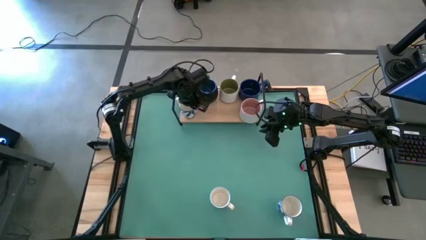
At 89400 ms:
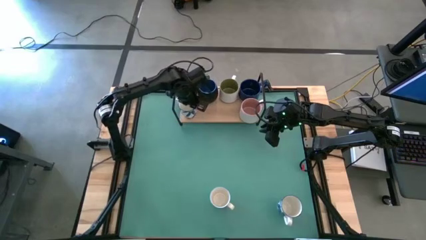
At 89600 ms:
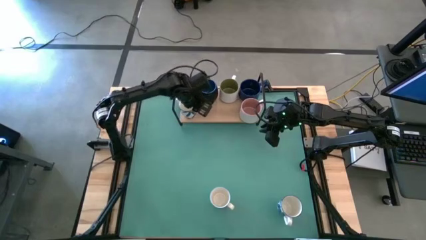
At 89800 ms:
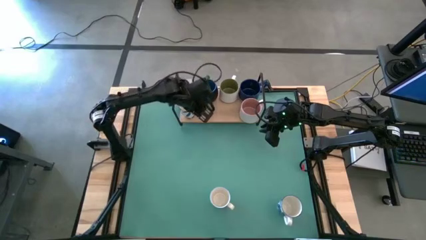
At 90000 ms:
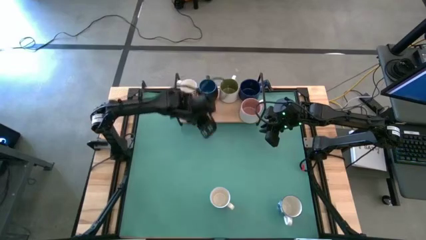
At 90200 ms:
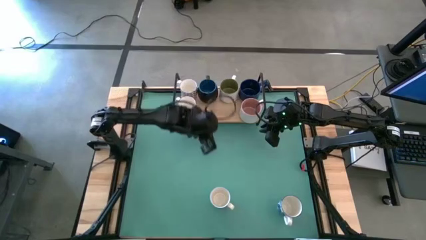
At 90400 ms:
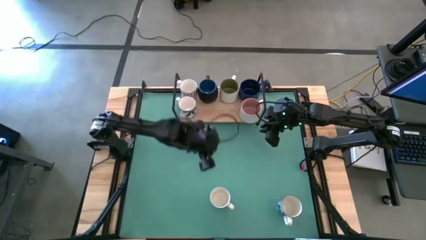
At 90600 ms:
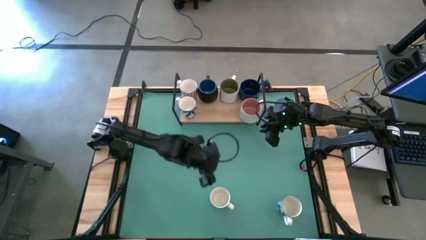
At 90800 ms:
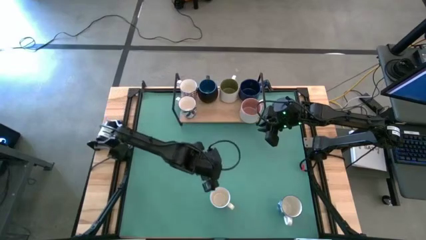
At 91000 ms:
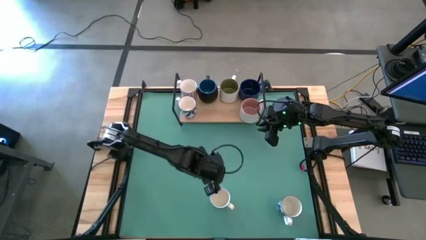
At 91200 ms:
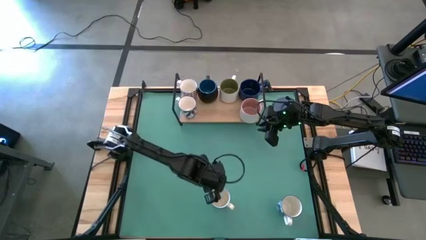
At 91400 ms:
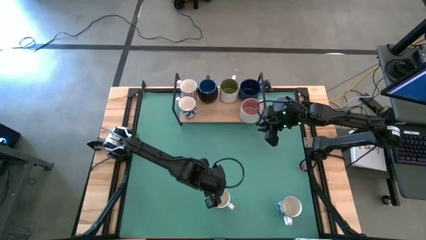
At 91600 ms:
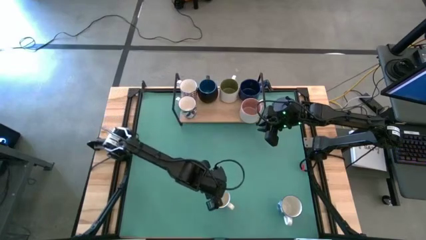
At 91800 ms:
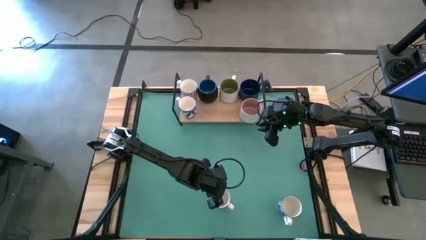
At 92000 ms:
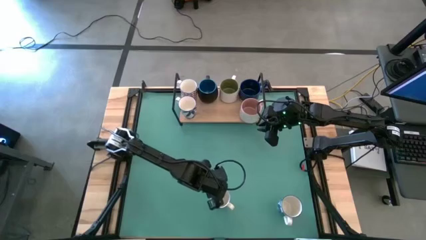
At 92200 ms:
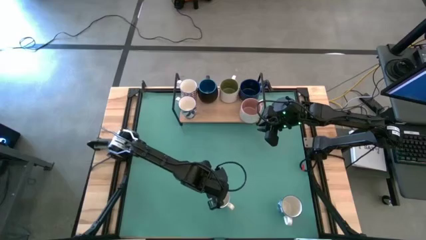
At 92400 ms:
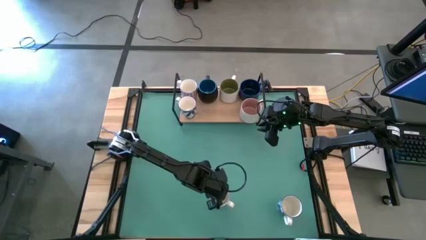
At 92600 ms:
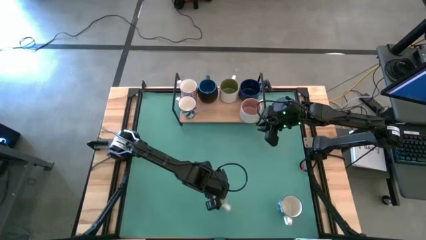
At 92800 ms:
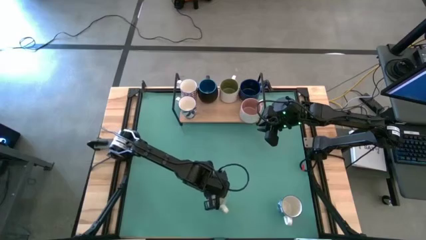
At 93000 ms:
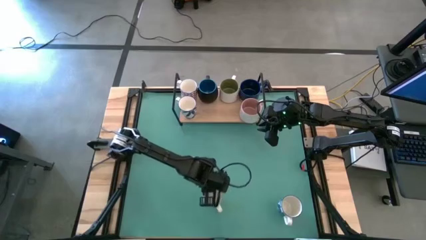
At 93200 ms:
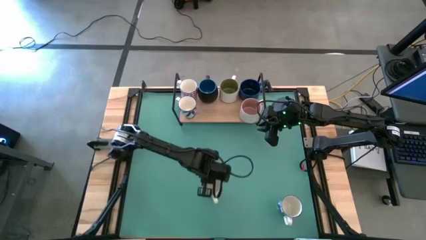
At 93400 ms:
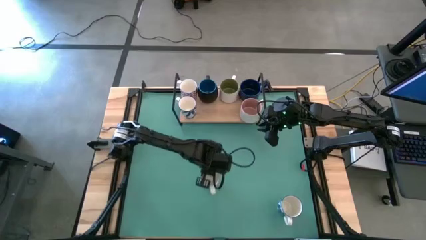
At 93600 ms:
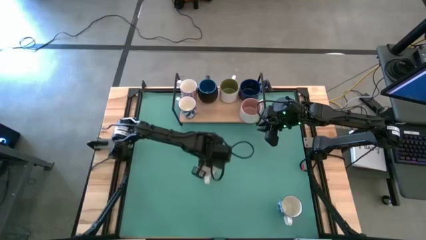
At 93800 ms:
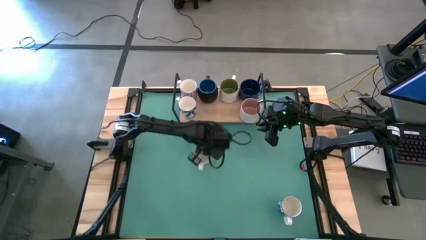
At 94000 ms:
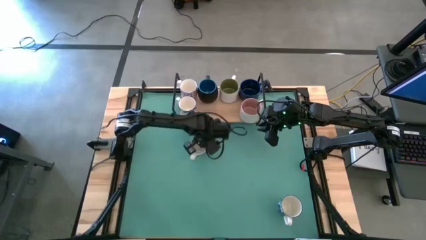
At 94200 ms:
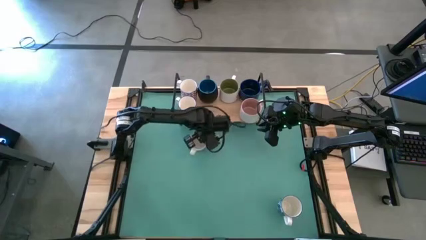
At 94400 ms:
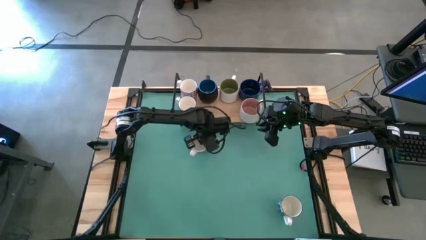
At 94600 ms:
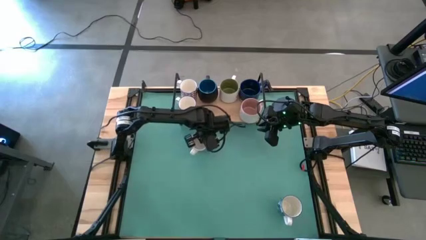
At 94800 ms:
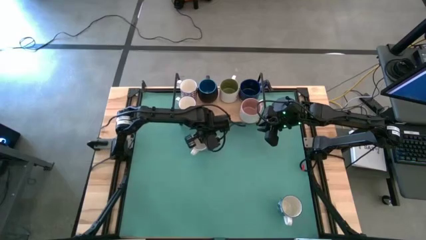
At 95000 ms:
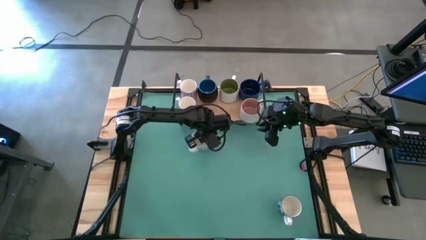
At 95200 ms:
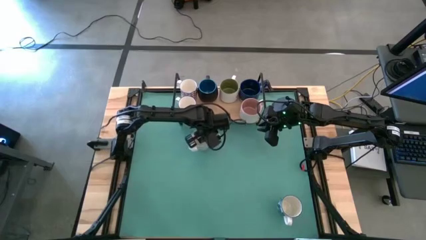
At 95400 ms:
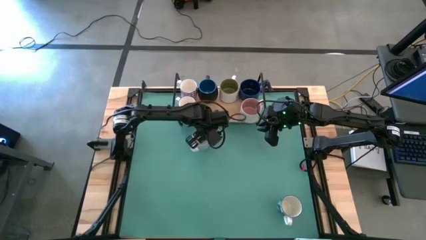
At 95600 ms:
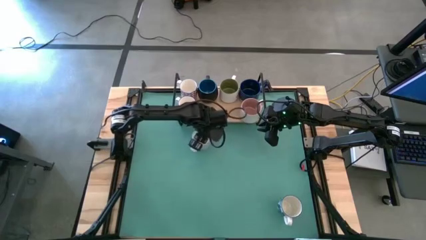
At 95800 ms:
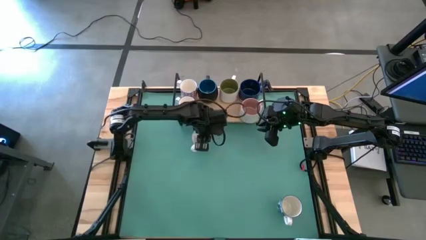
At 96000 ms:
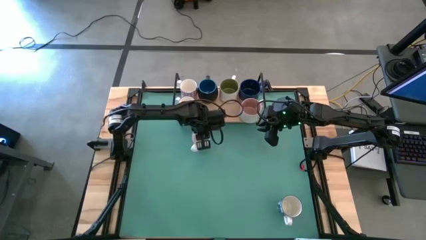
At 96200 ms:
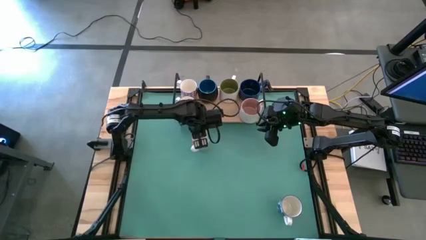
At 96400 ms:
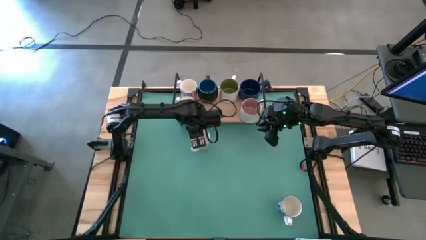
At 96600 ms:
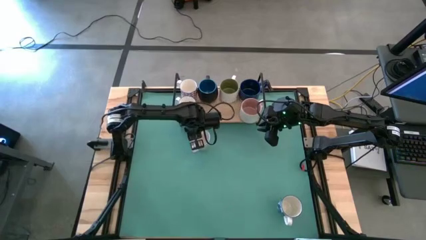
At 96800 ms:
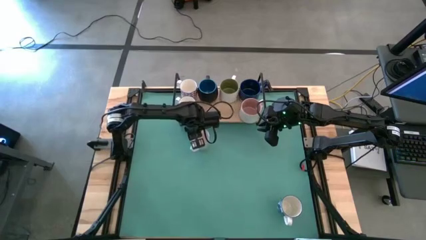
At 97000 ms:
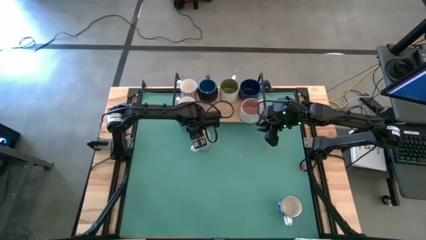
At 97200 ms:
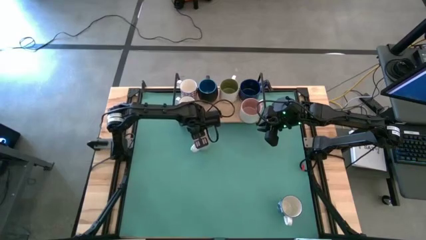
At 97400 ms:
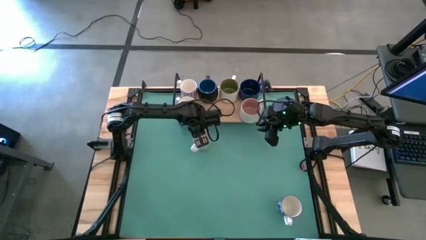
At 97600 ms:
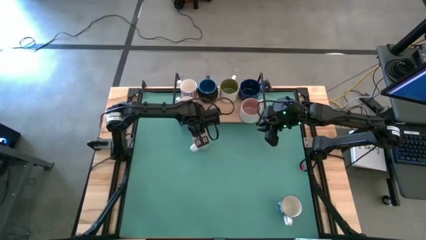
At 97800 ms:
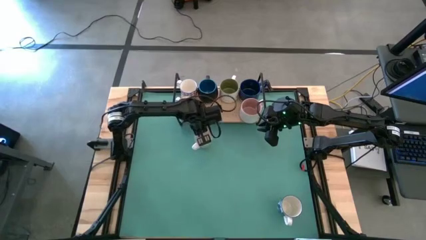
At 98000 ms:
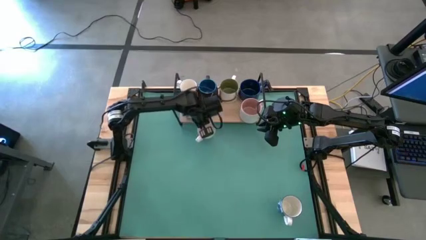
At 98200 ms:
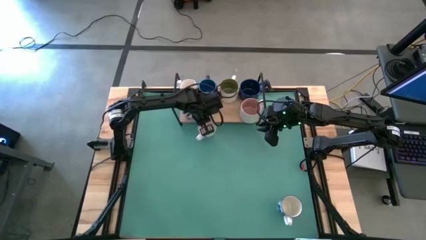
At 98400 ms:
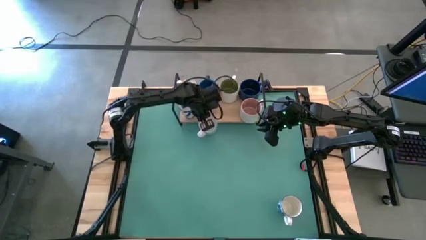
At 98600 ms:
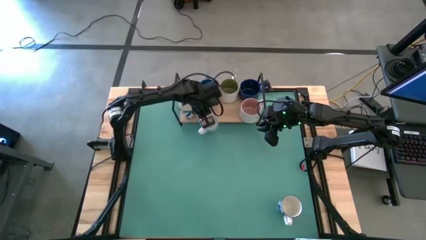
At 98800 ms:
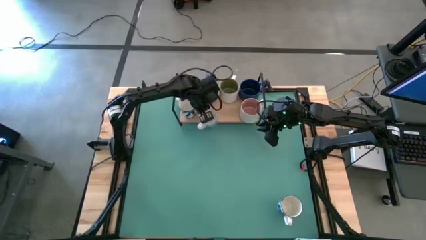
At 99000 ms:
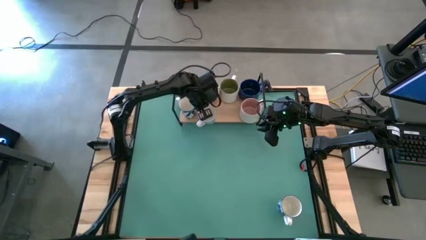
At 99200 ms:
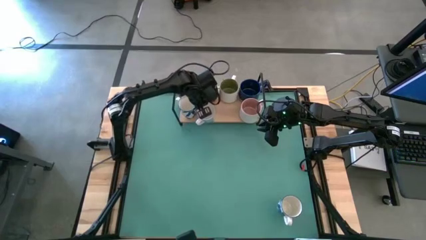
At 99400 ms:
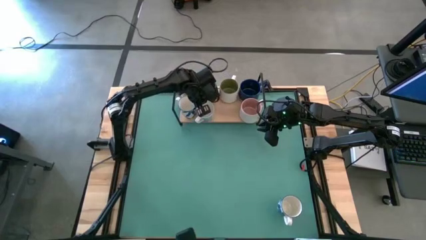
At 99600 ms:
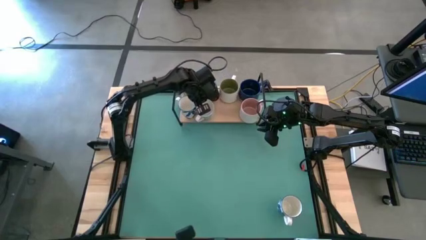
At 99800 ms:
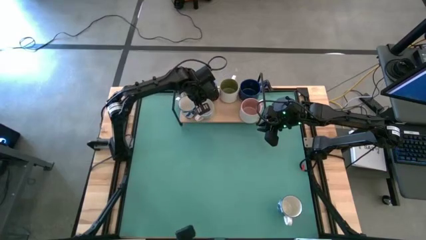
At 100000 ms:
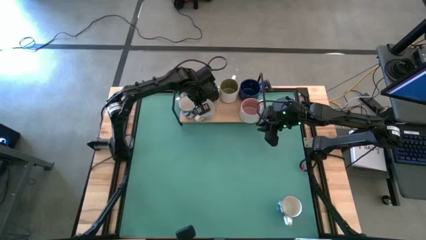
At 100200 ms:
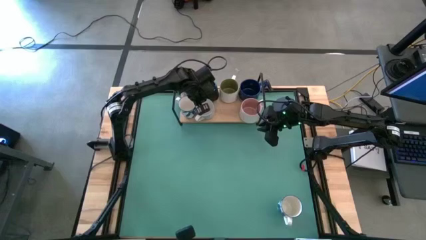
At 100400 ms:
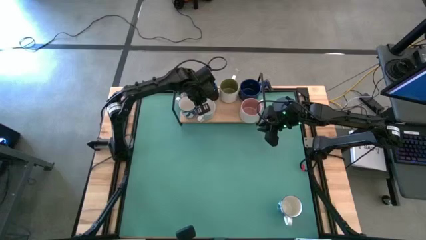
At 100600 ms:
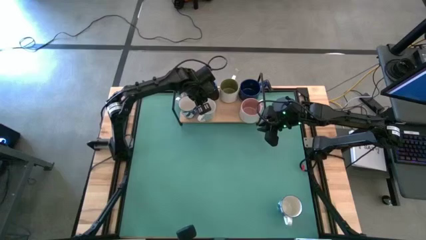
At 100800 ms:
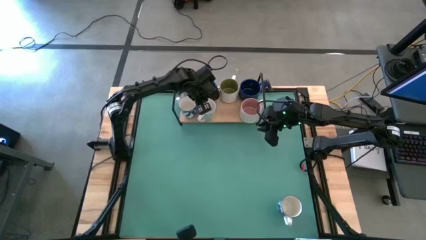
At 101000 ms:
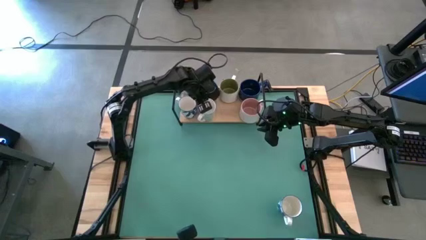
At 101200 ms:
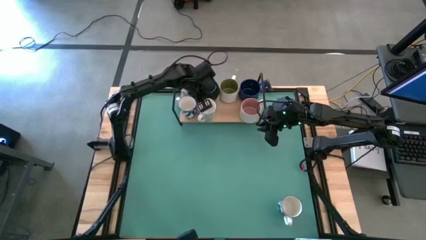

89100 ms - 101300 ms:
Task: Place coffee mugs
Put the green pattern mug on the shelf

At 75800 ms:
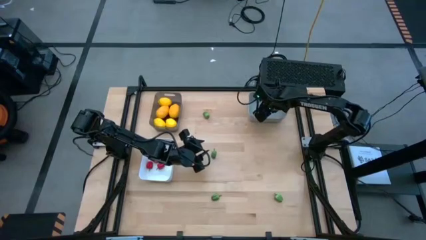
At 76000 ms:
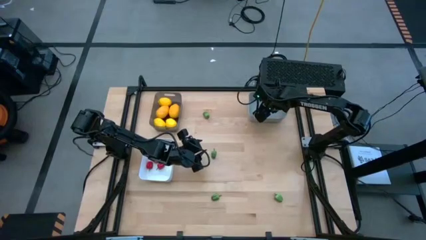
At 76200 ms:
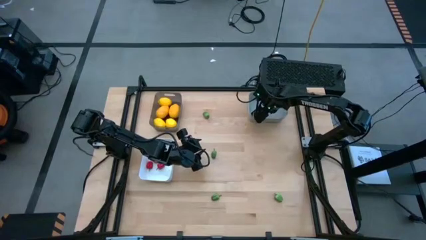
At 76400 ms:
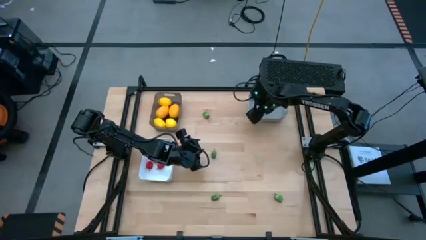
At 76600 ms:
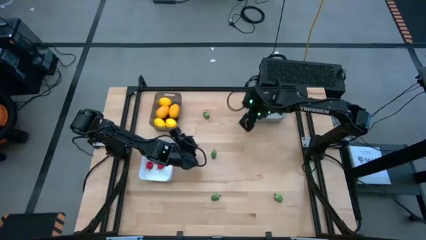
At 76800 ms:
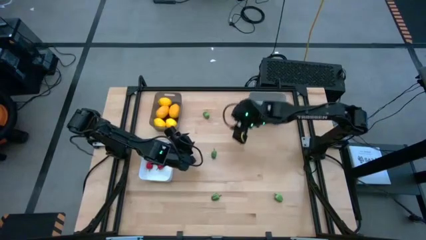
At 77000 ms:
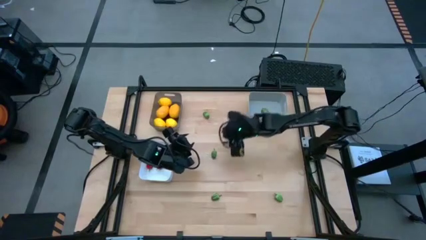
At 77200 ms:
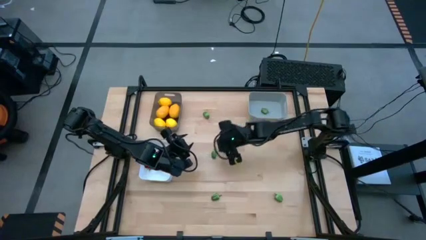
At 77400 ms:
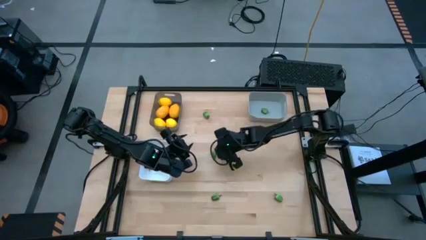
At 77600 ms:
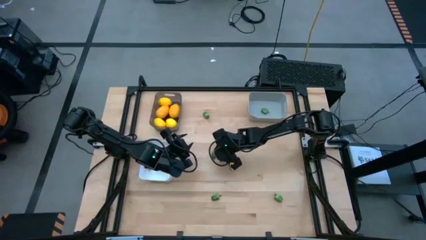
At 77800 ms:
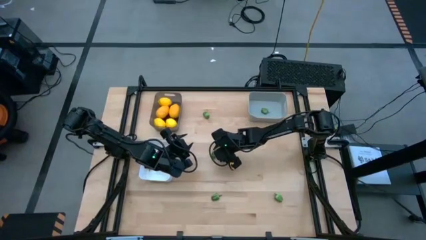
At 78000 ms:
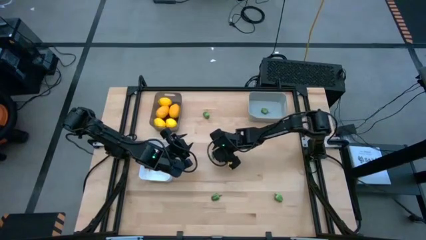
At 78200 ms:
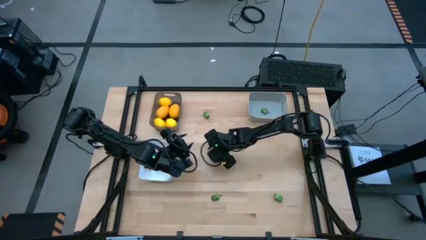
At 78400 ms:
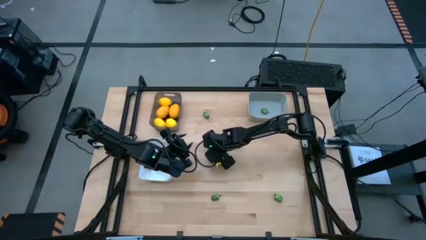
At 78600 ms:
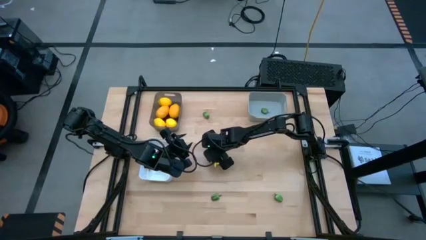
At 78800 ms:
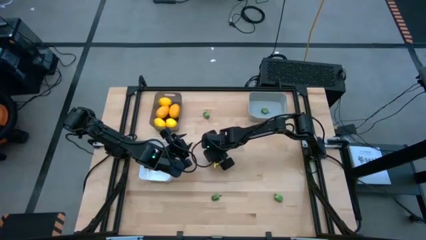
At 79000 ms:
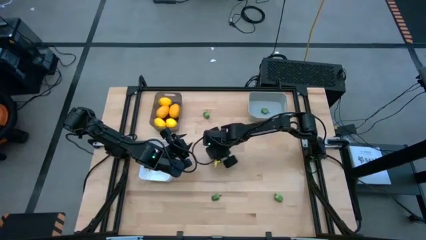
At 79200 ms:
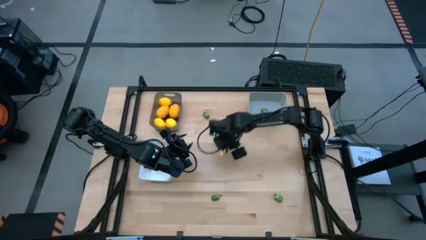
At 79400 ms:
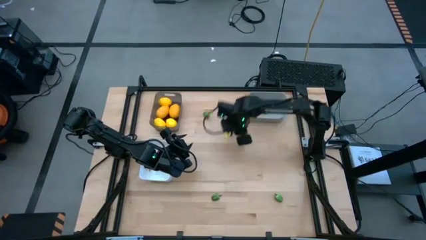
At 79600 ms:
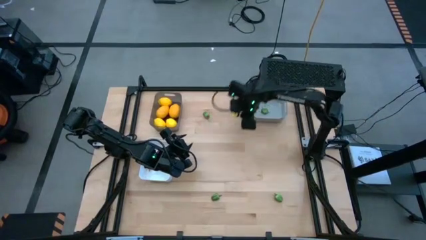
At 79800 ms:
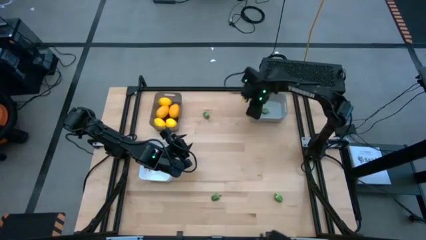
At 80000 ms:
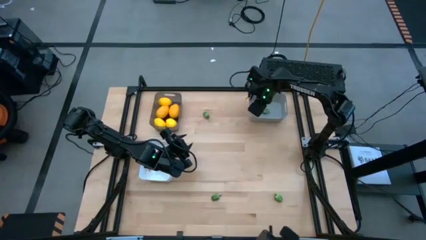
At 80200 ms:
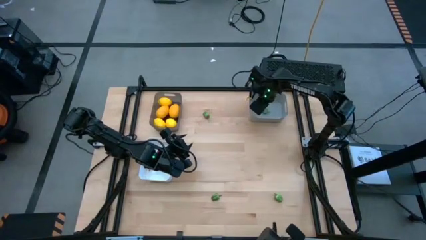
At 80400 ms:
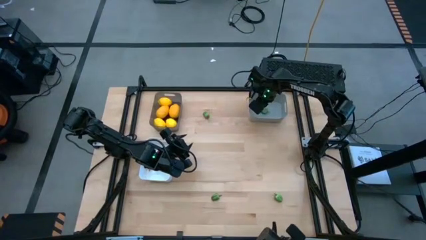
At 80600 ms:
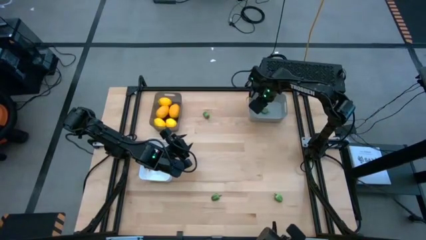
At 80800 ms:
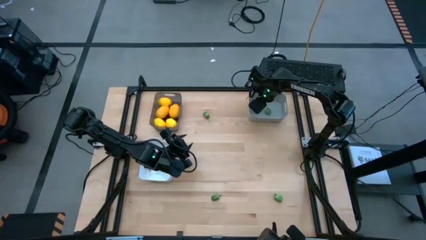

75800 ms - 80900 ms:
Task: Sort produce into baskets
Put the middle left green chili pepper into the gray bin
